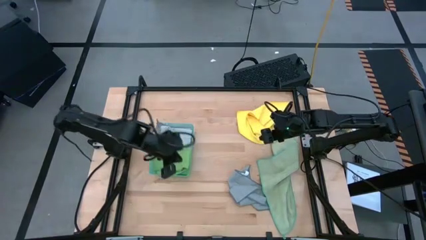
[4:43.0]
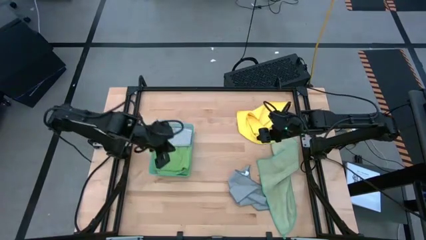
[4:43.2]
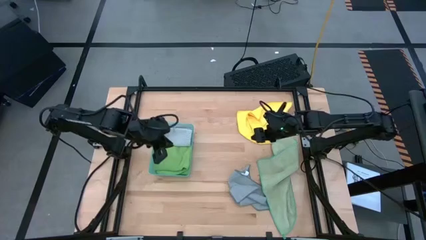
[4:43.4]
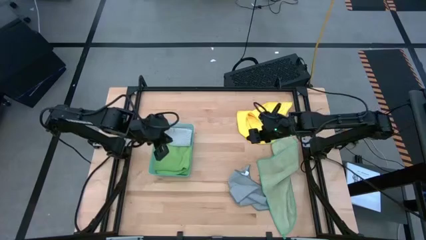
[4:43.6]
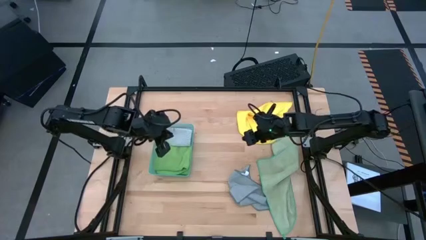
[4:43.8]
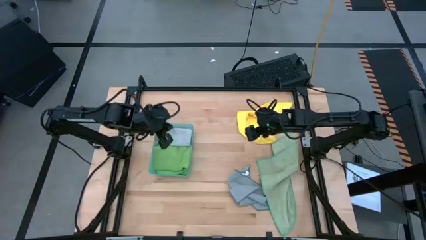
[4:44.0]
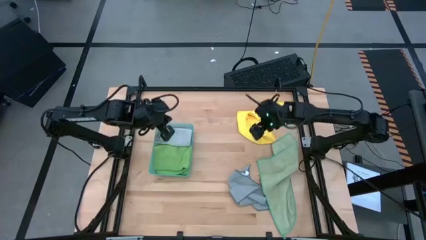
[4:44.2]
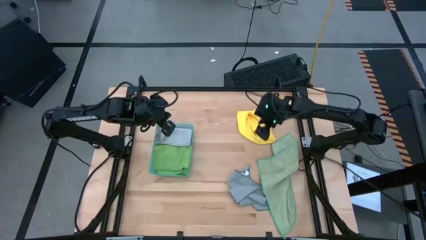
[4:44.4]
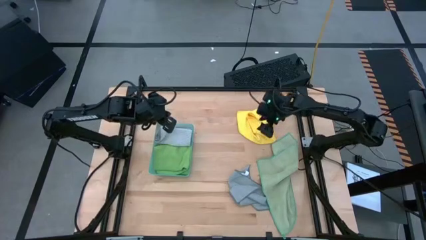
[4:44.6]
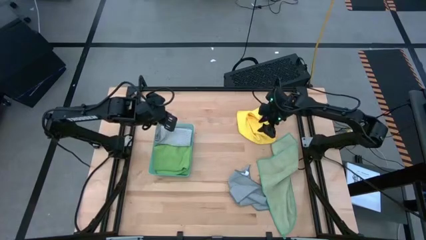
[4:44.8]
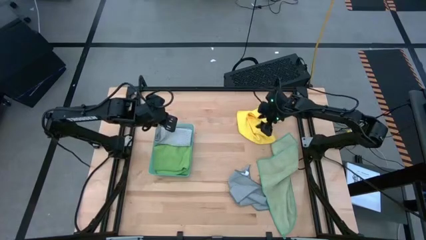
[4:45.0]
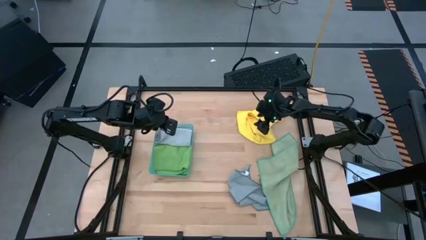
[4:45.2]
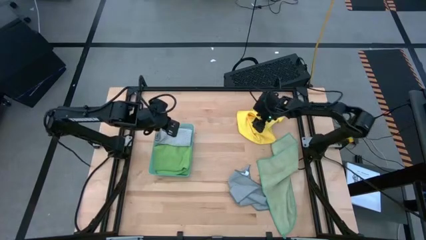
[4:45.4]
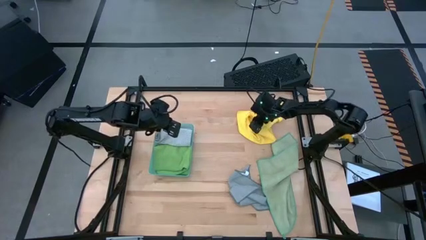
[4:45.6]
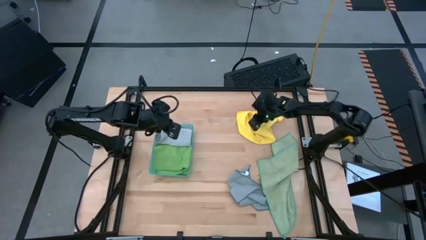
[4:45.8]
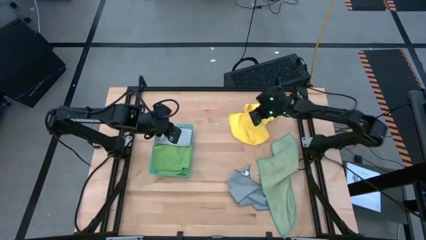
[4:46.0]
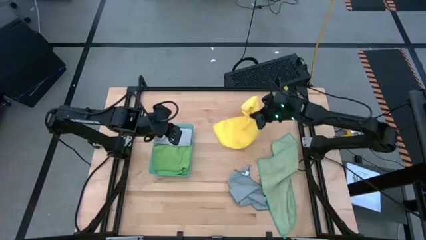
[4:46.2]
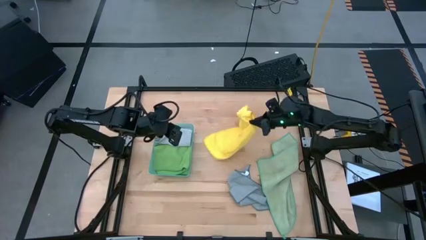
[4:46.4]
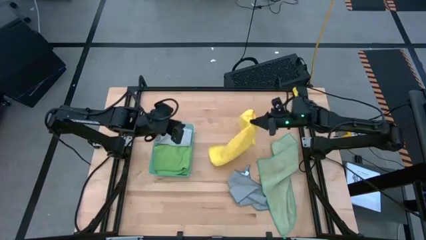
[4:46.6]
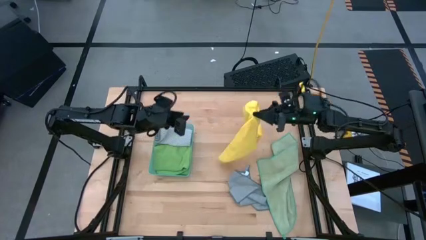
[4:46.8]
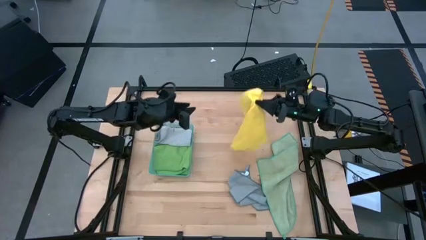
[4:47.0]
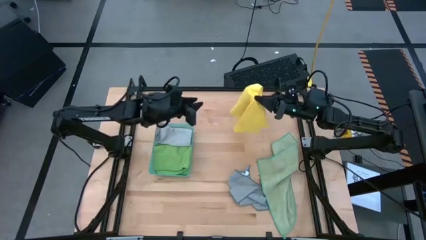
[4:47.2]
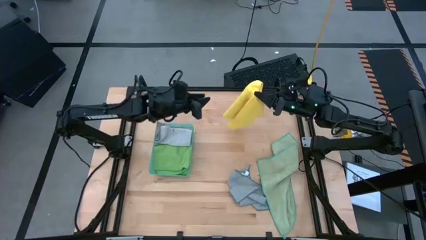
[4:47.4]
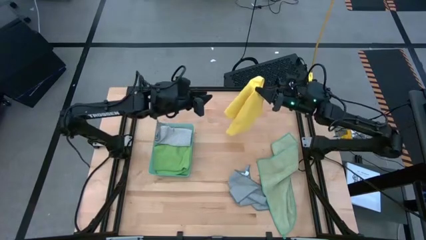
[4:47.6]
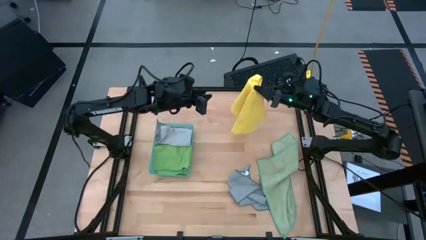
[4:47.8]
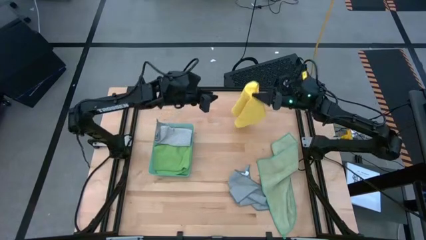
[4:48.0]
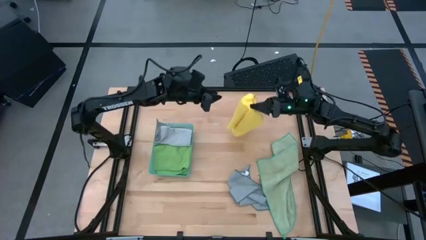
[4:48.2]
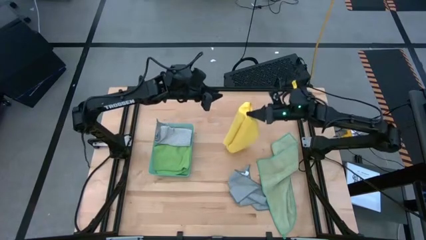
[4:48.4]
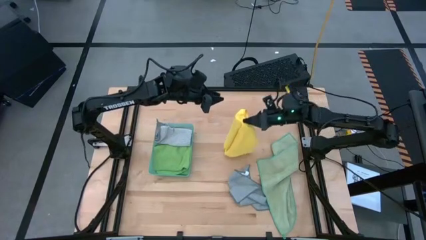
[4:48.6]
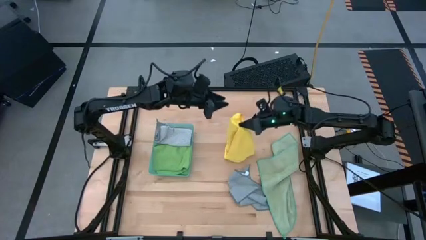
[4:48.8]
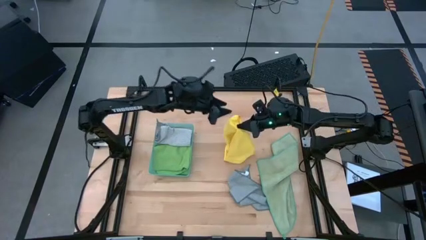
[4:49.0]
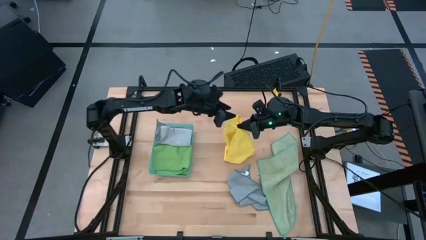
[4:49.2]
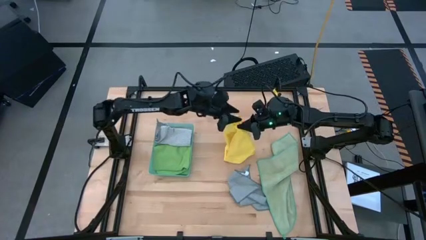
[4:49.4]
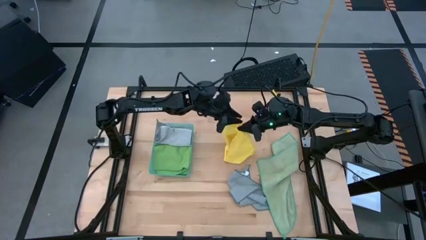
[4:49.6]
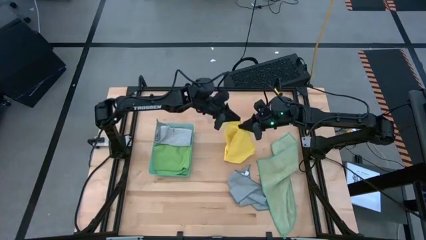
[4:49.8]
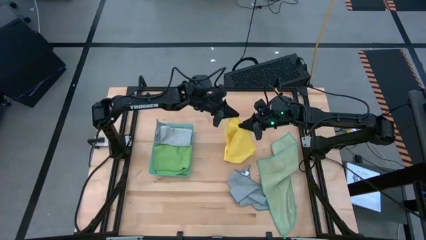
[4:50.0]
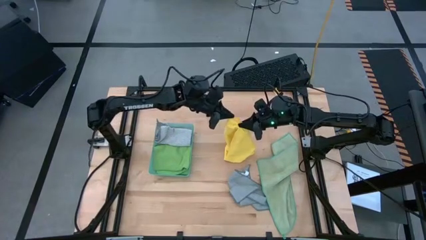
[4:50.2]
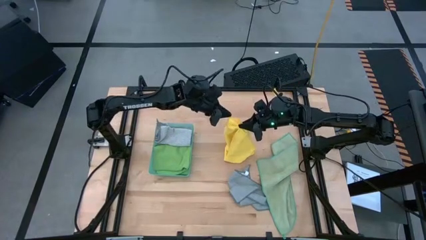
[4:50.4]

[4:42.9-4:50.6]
Task: Fold microfiber towels
Fold the yellow microfiber cloth

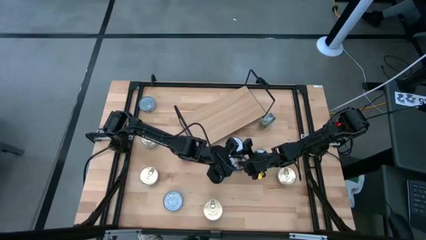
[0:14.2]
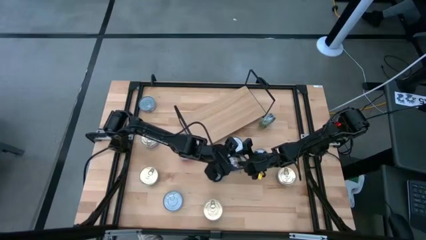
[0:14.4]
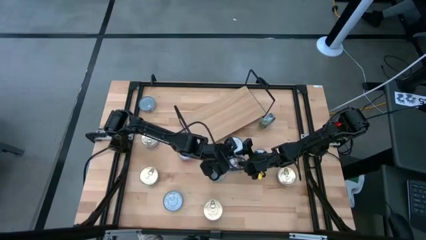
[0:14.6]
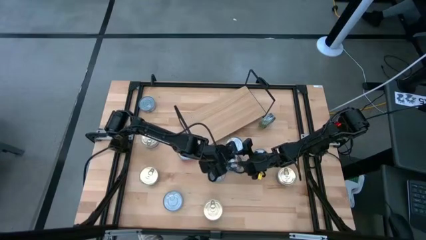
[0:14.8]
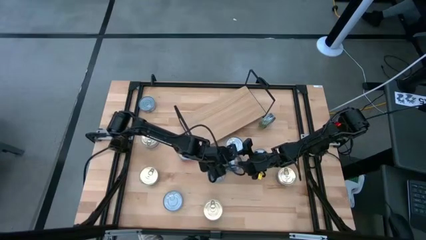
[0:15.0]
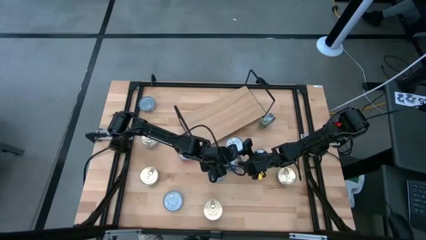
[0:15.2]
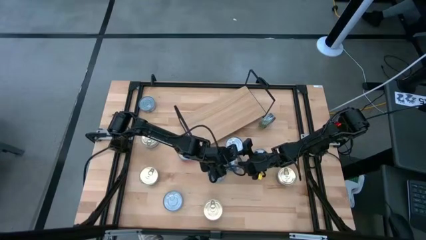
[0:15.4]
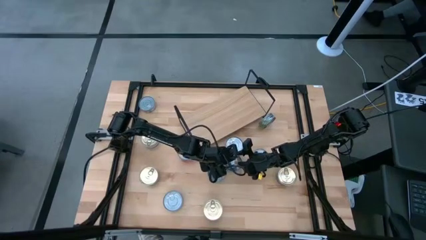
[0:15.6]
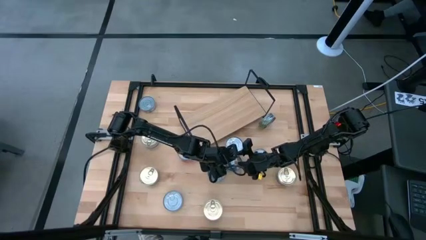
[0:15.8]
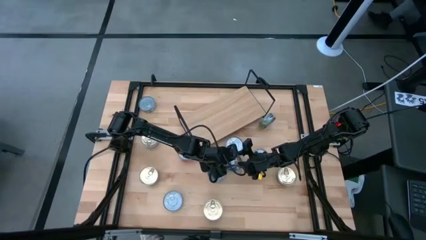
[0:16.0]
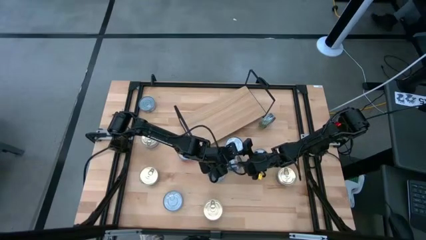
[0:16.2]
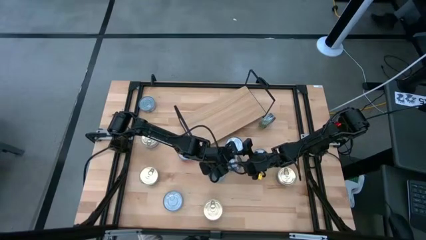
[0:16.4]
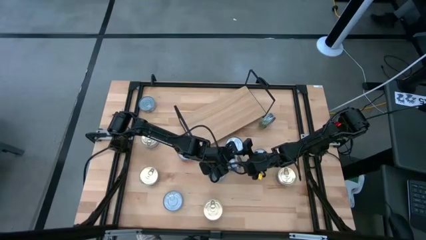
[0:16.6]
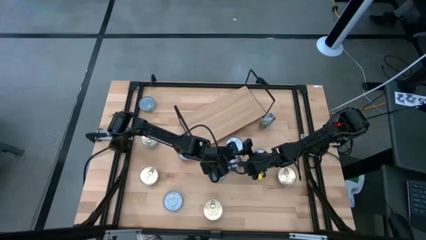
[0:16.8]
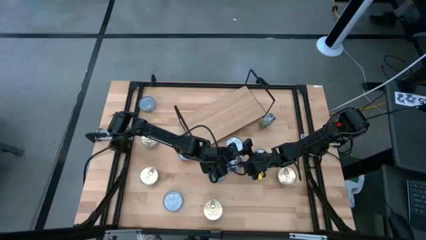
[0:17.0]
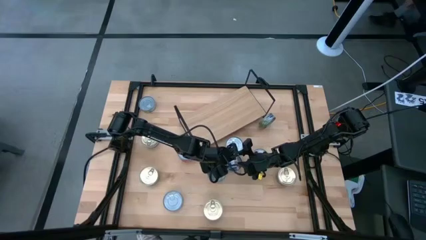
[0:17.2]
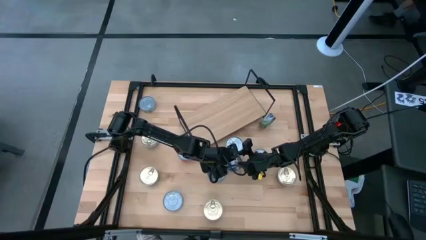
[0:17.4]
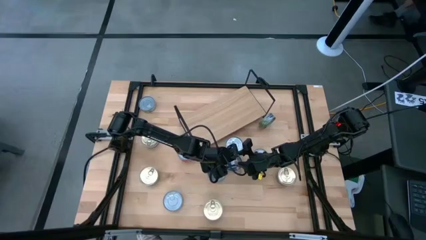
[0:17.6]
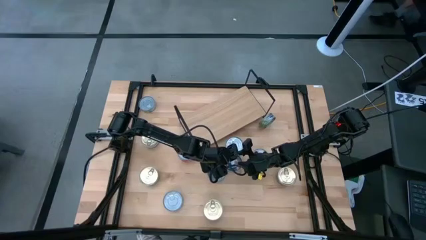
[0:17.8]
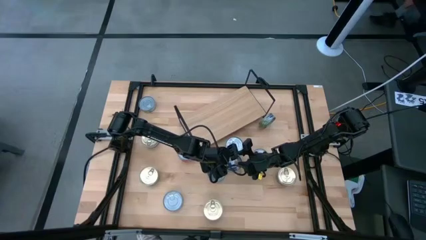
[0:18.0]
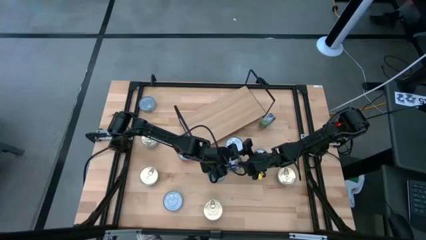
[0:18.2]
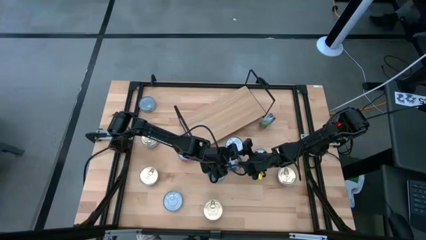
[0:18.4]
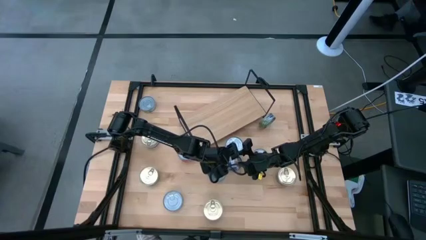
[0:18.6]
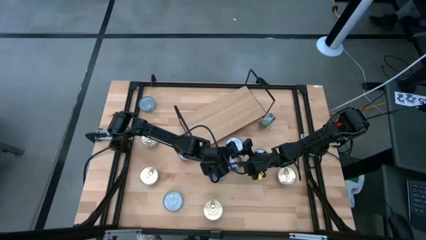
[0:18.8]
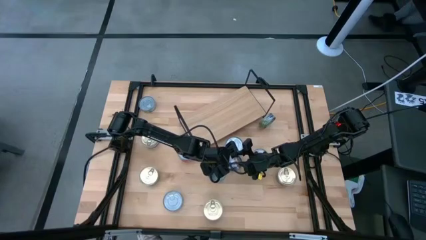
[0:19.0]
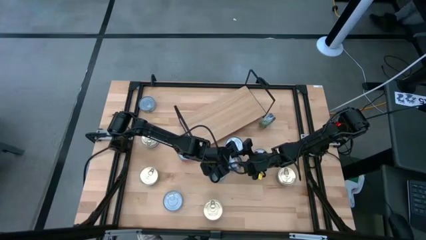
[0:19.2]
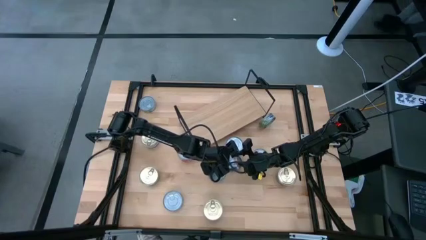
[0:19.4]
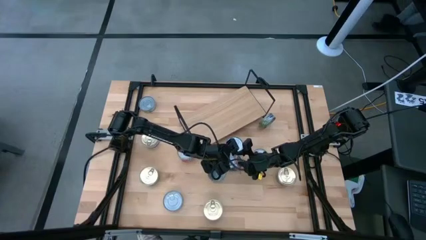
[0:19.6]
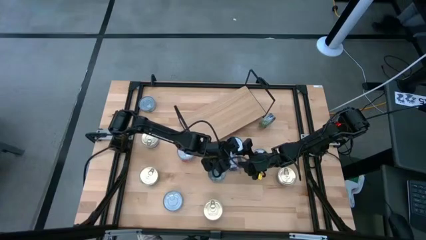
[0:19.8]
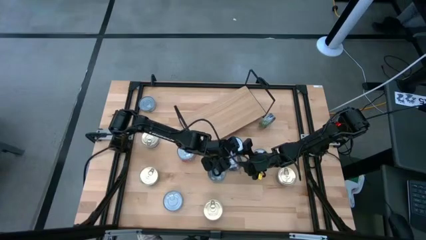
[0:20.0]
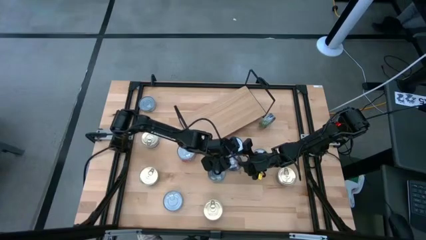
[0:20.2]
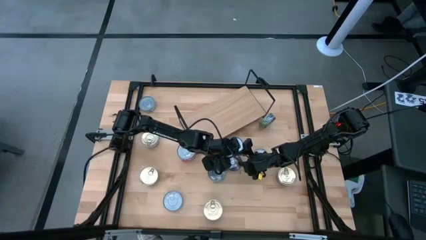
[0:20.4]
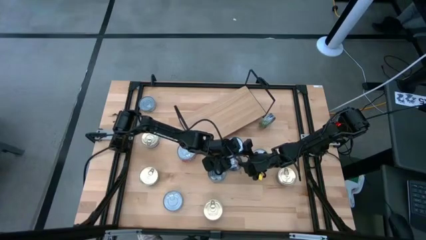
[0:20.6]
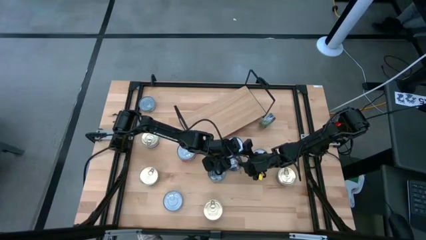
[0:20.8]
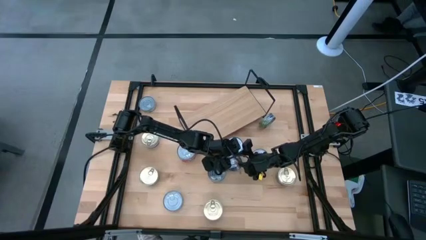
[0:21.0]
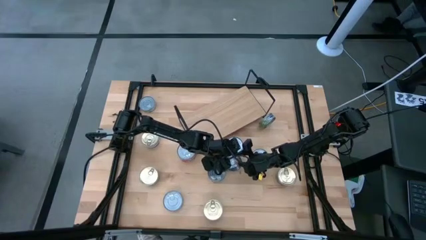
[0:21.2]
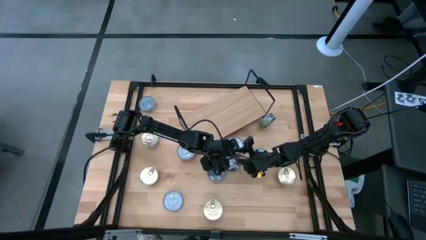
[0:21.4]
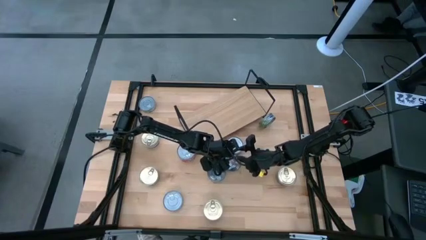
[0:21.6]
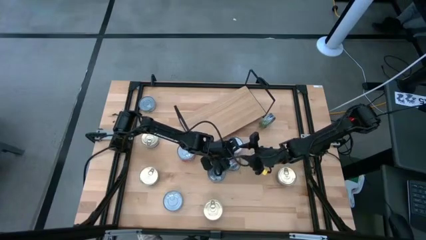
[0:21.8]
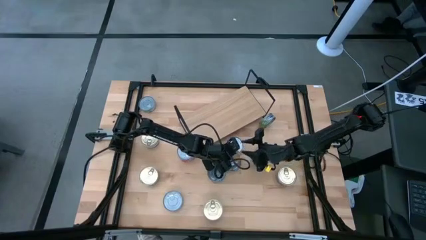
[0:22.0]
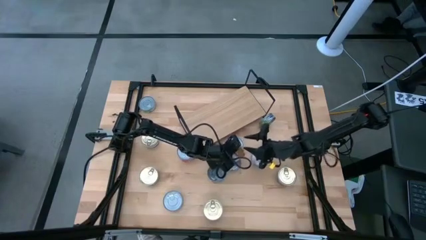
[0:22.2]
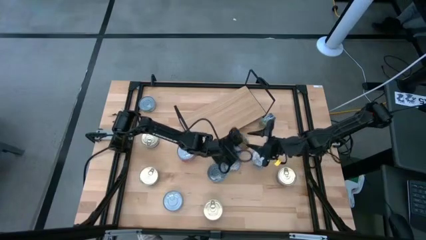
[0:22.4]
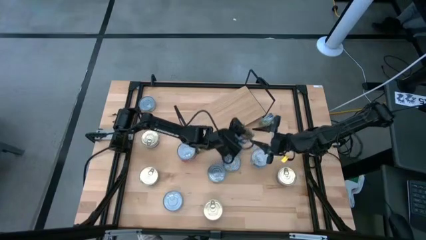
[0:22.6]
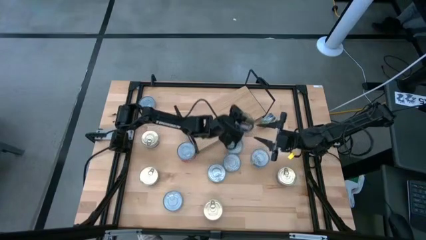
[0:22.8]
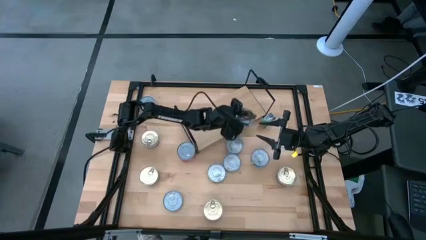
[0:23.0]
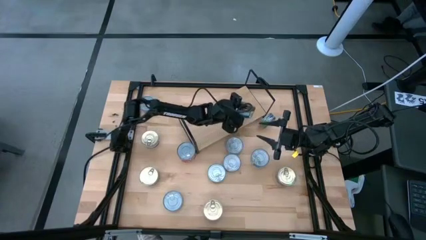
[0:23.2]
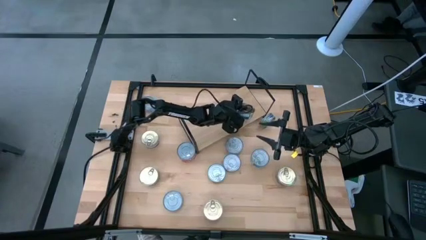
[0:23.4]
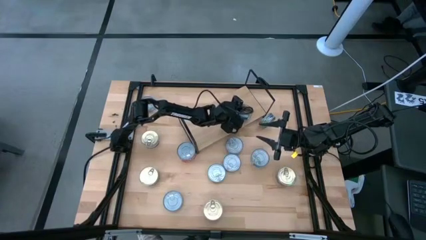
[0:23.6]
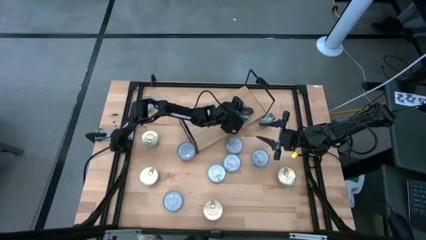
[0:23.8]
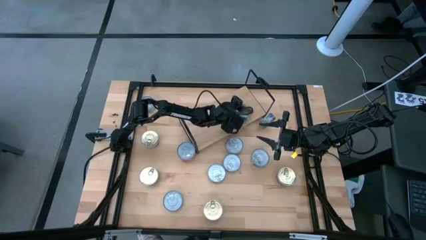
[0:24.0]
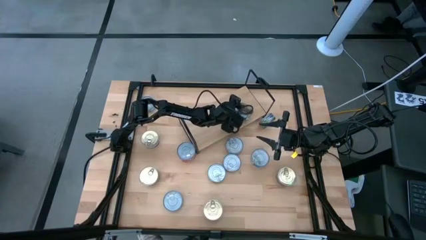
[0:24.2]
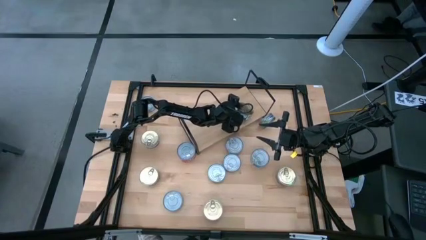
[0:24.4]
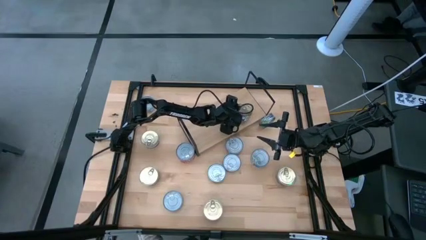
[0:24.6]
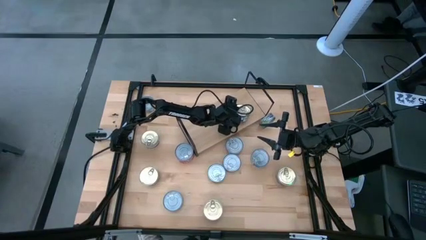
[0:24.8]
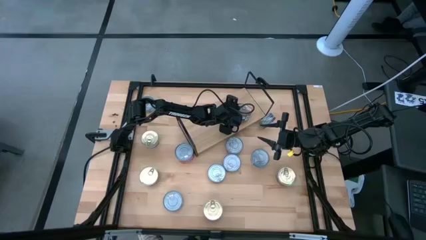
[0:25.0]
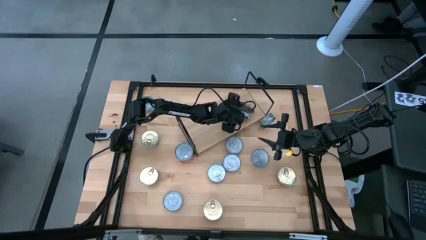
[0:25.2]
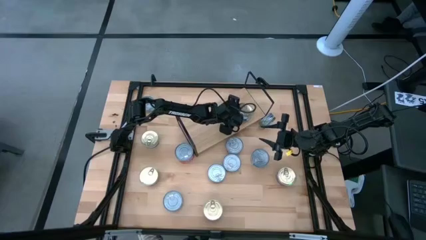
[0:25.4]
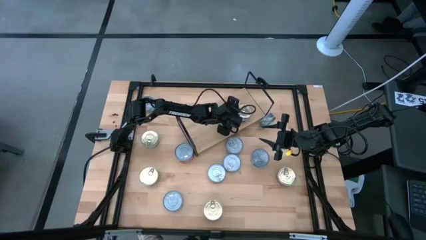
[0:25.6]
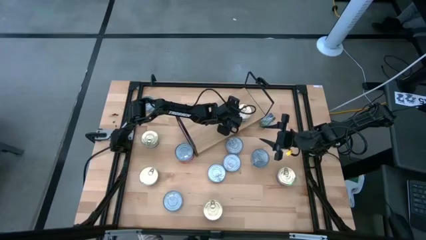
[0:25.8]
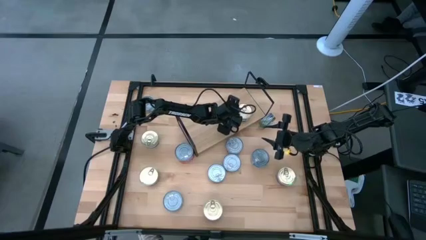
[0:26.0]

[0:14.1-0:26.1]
Task: Stack canned seafood by type on shelf
Put the blue and pink tuna can on the shelf
